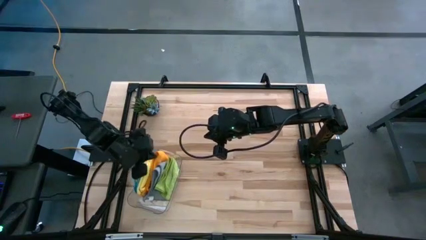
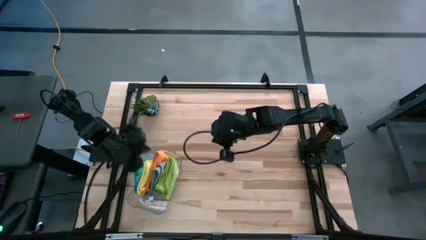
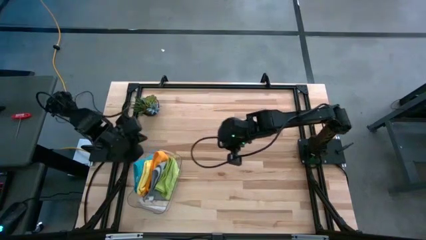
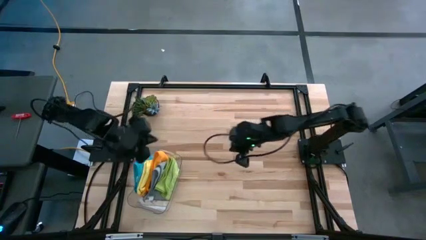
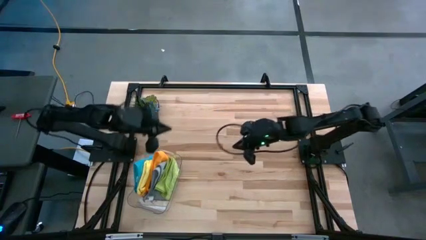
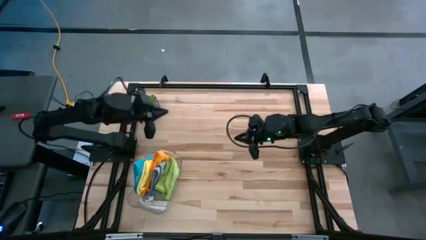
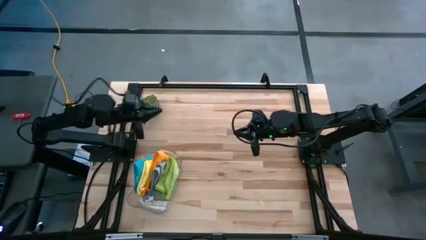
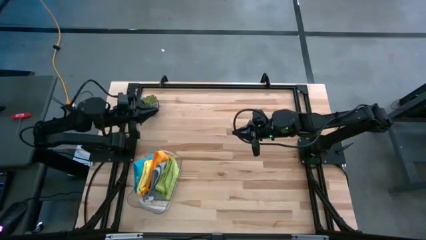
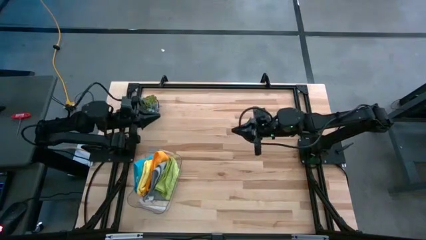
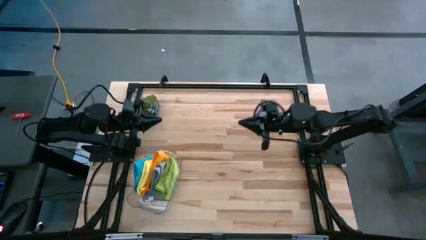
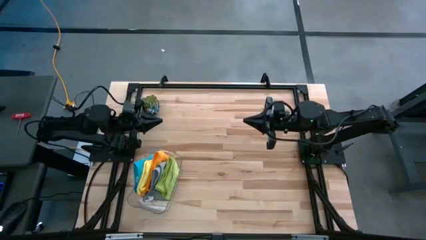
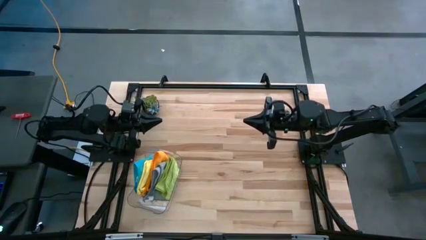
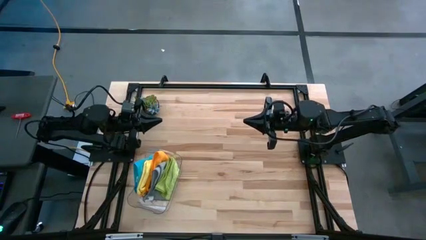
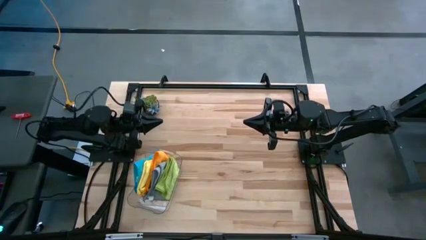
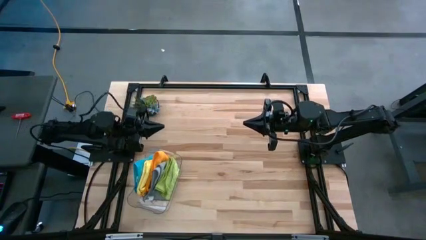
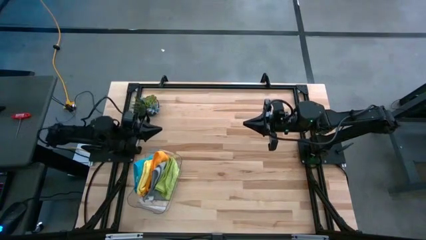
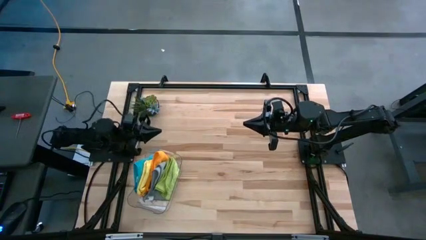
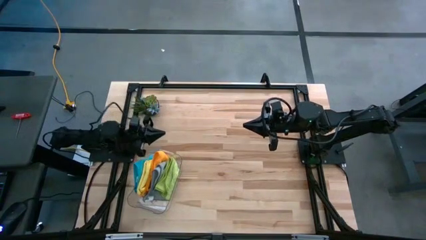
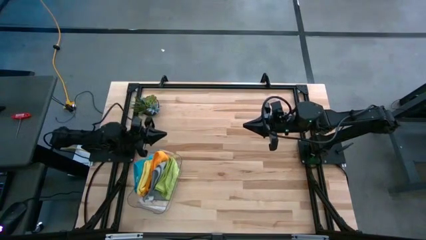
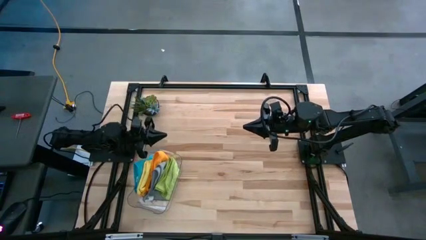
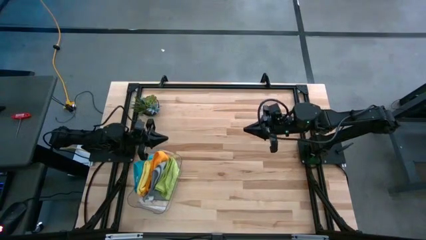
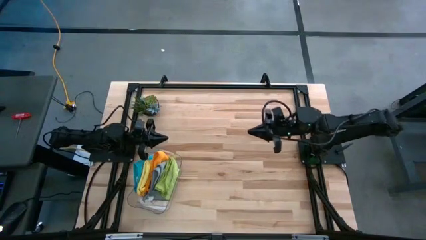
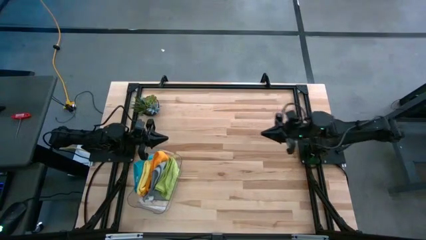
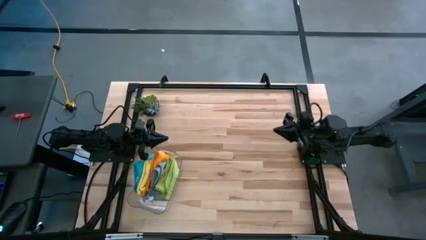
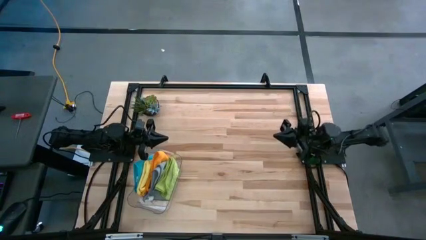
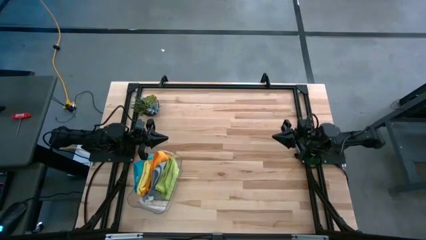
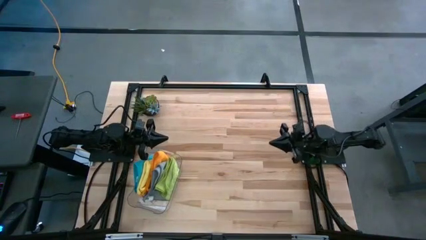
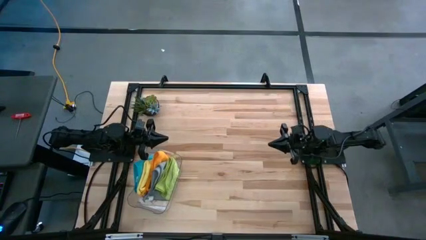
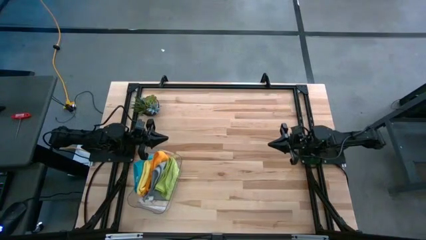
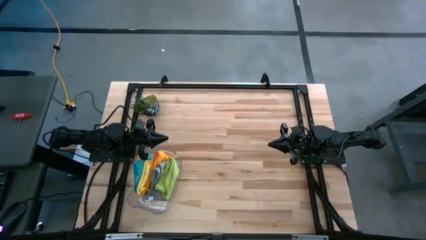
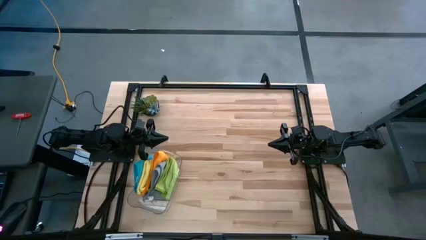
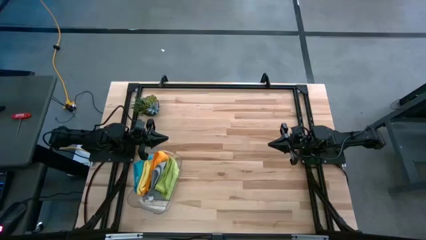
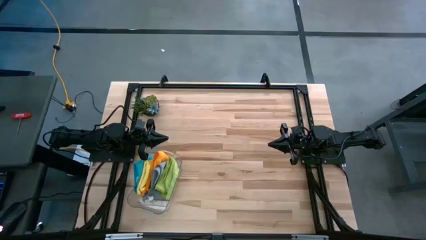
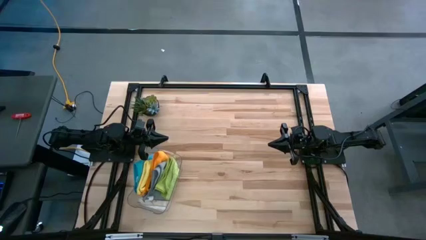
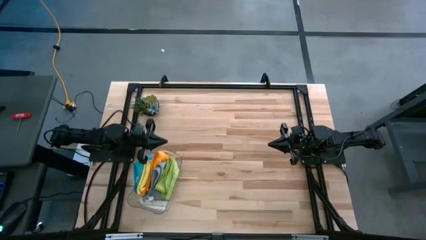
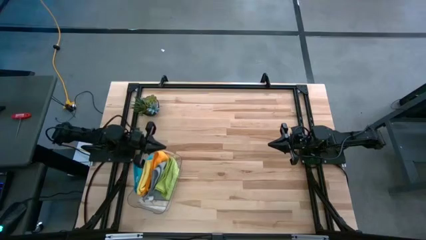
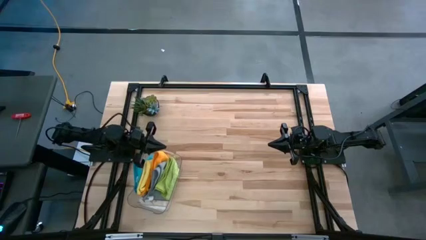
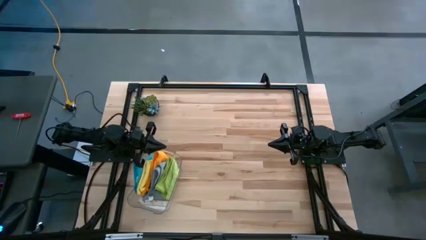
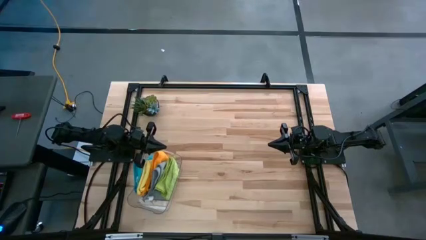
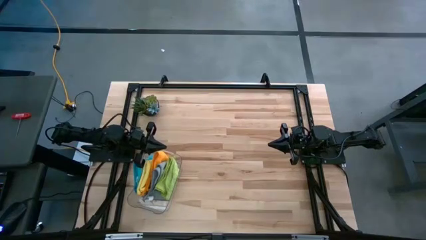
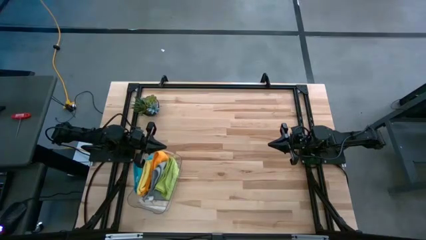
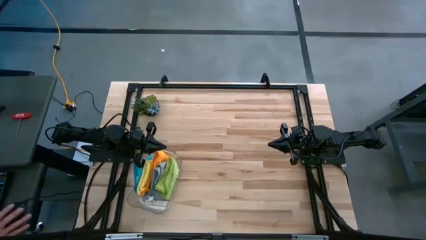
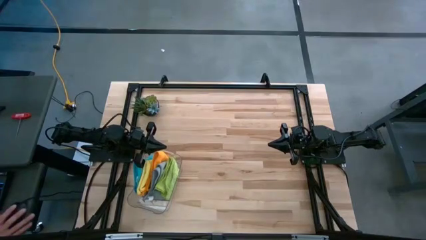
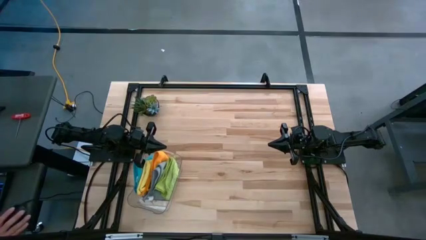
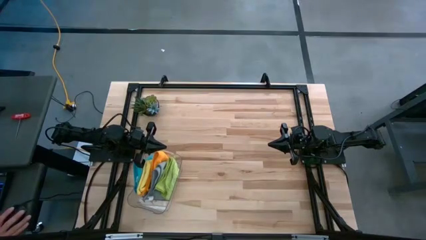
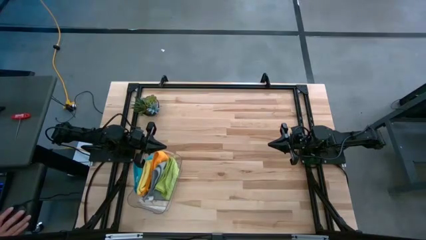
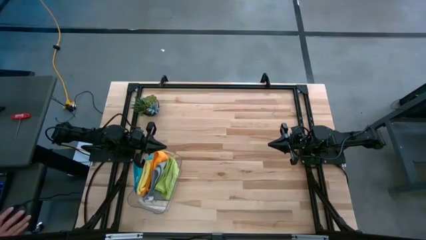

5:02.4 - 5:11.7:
Task: Fold microfiber towels
Return to Home Position

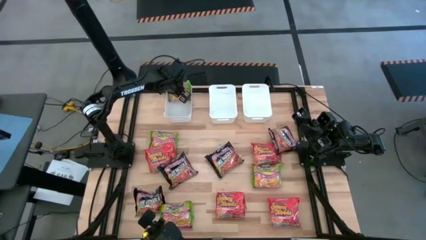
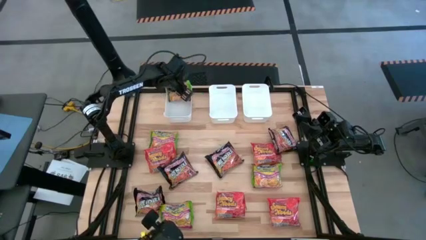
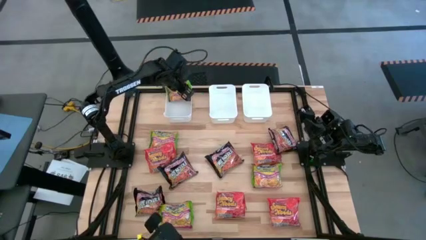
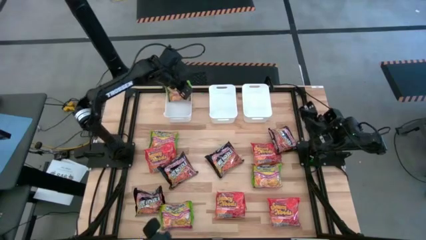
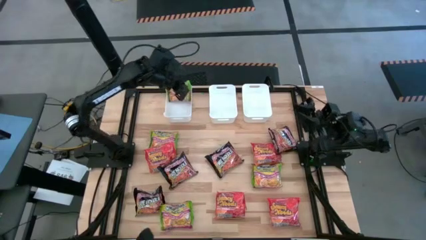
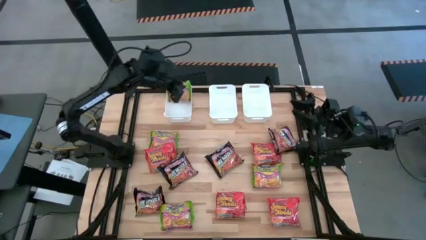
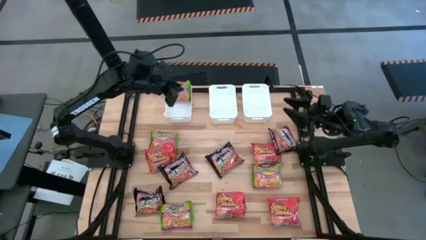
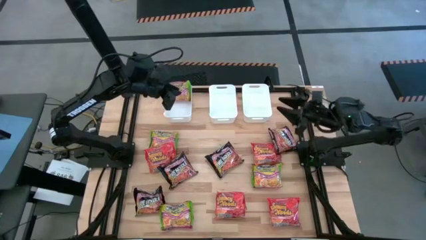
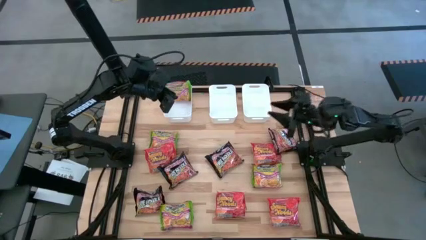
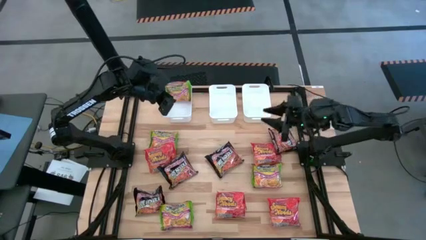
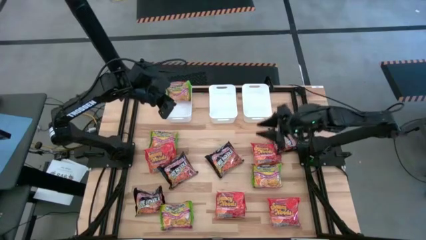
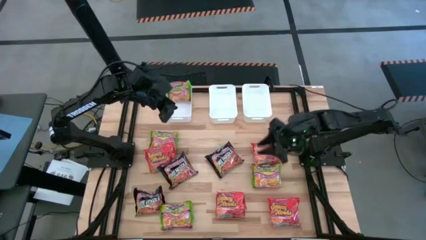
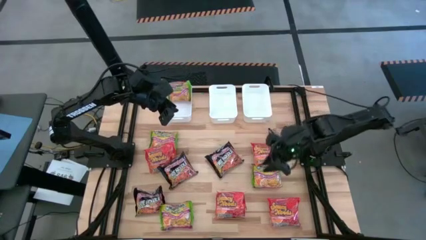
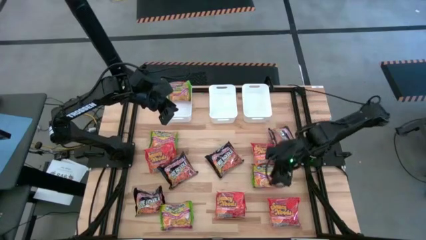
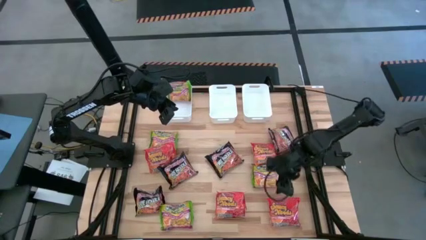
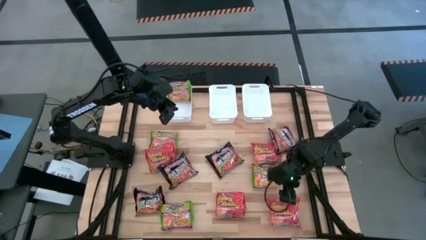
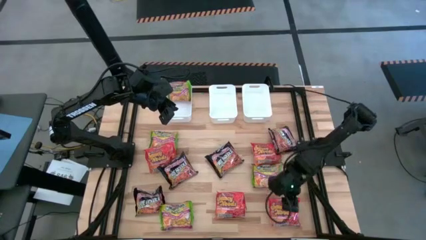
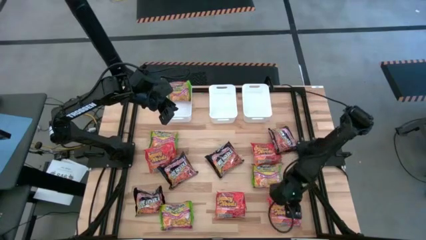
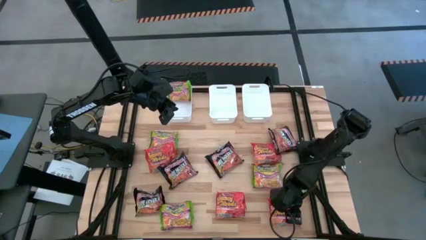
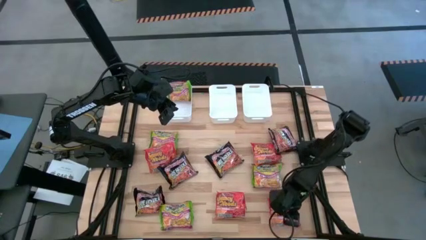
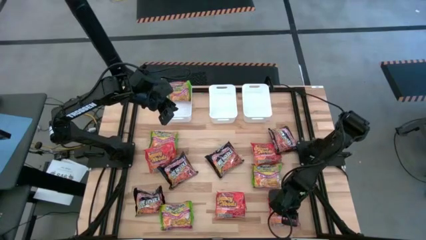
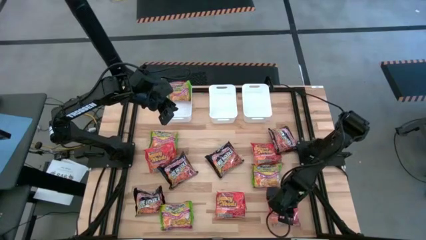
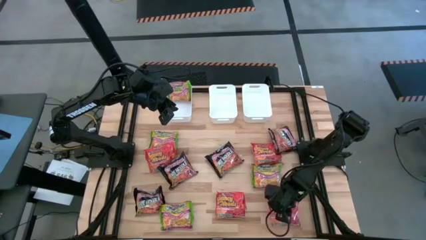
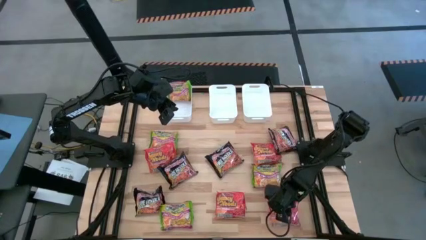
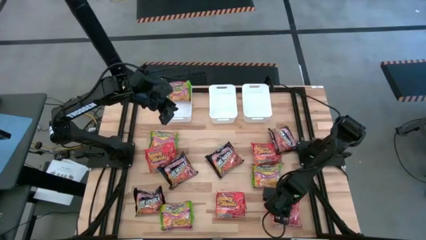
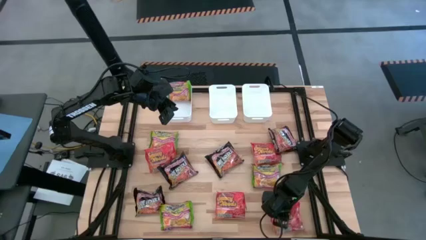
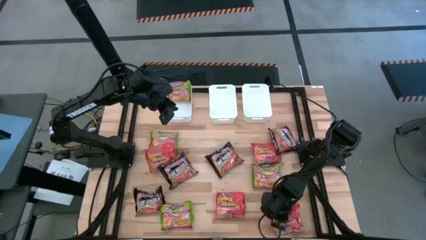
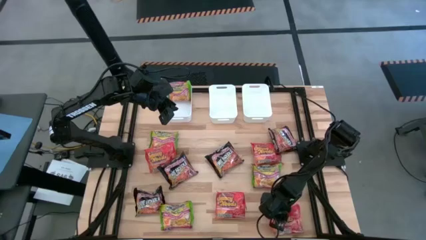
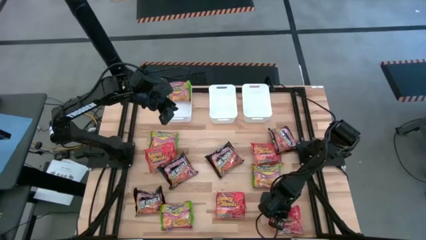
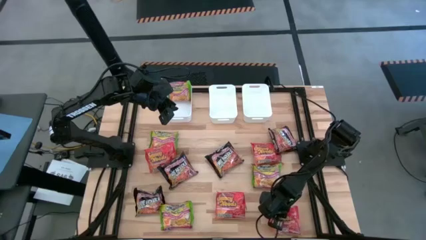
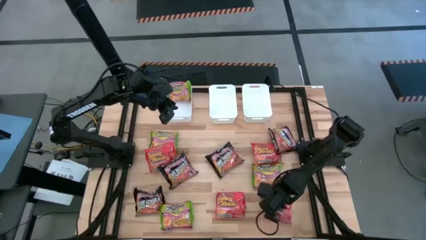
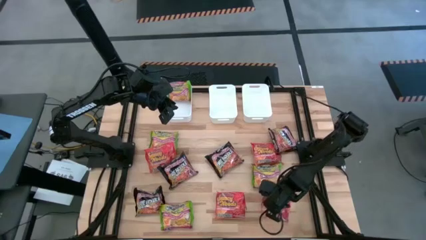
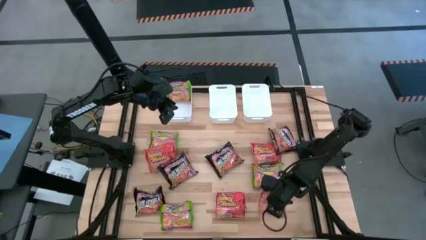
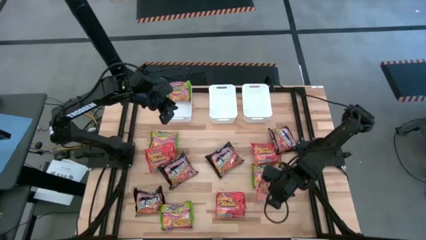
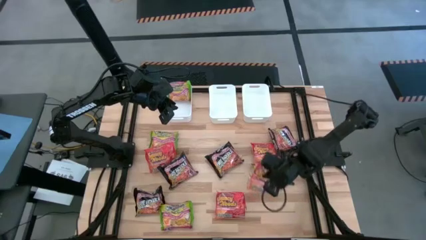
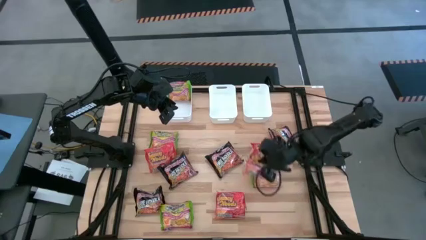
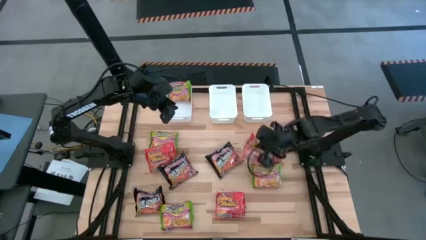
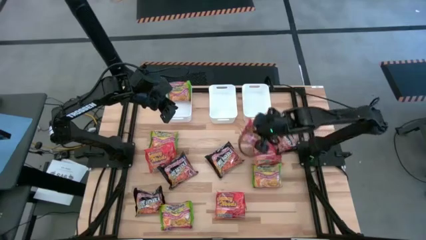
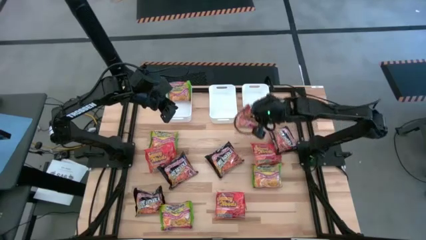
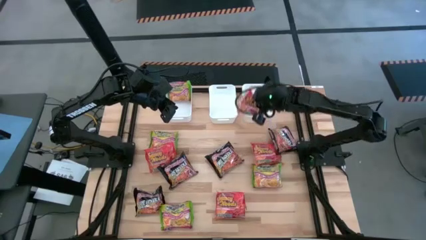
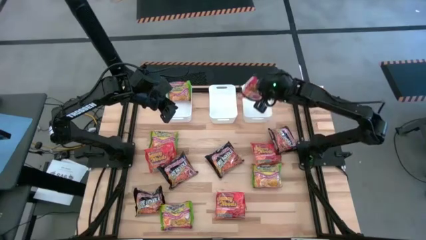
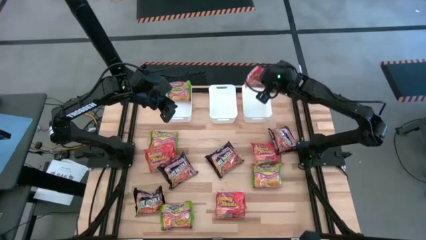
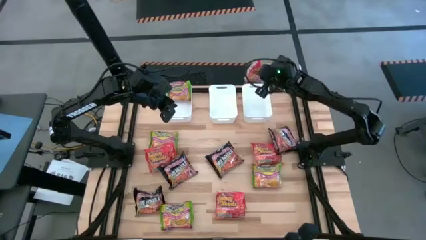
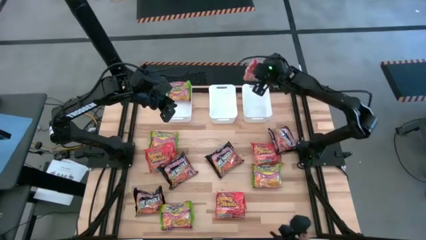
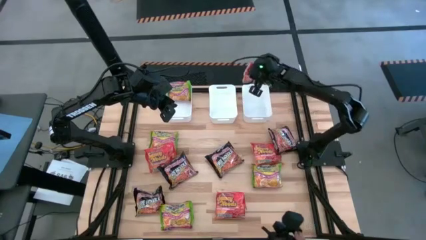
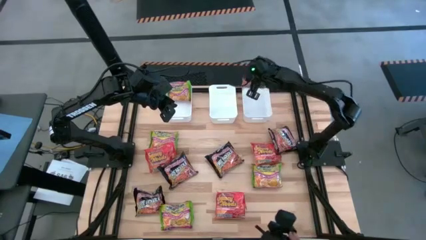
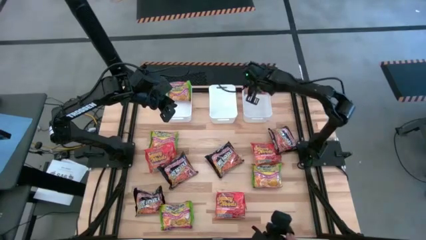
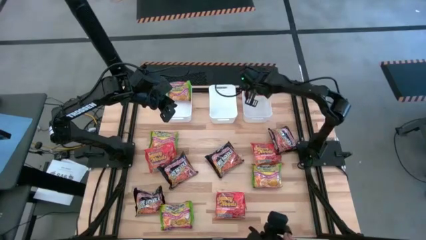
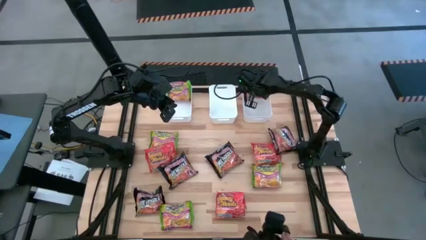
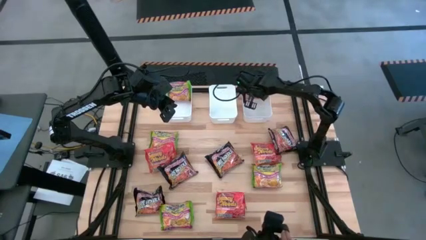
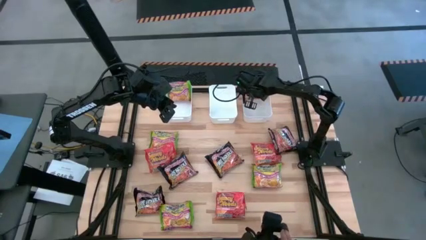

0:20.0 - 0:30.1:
Task: Sort Maruchan noodles
Put the orange noodle pack into the right white bin
